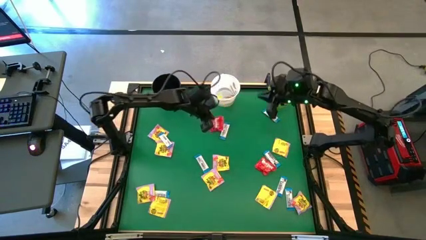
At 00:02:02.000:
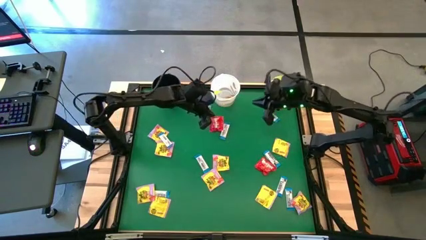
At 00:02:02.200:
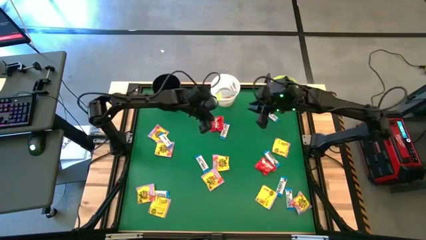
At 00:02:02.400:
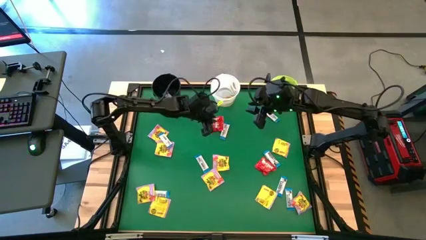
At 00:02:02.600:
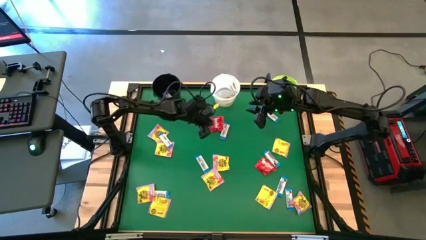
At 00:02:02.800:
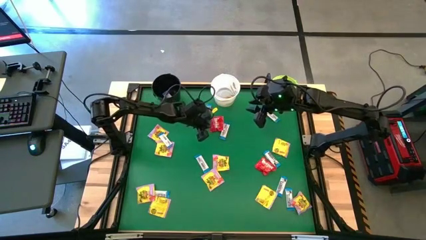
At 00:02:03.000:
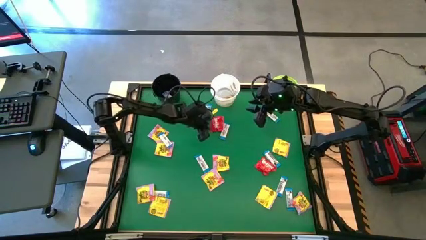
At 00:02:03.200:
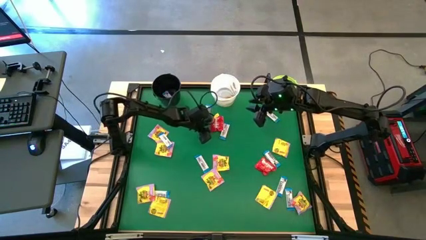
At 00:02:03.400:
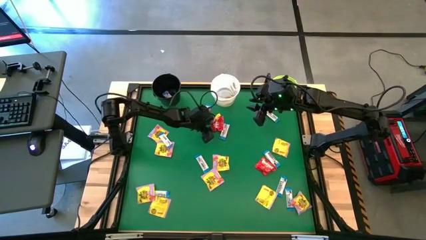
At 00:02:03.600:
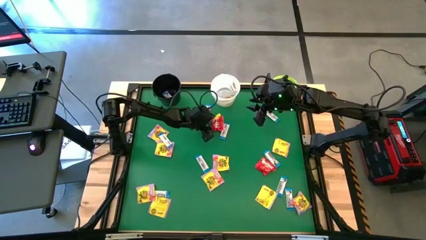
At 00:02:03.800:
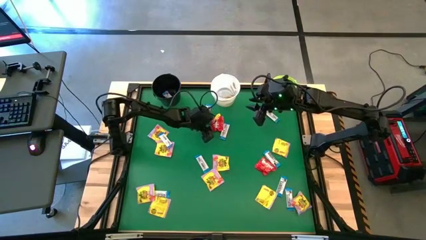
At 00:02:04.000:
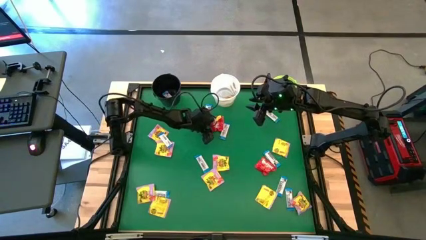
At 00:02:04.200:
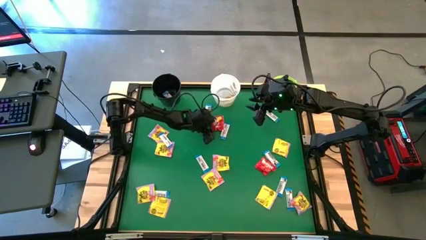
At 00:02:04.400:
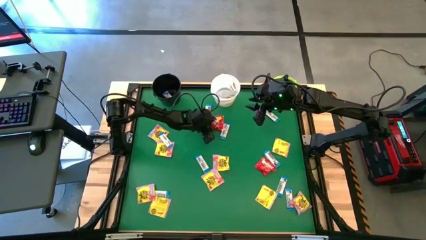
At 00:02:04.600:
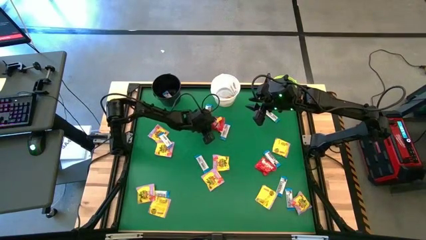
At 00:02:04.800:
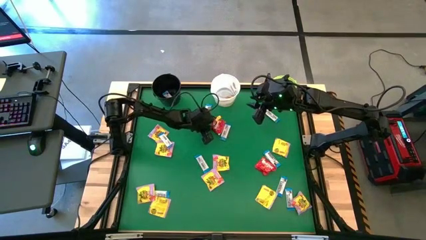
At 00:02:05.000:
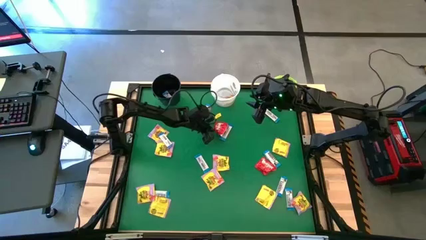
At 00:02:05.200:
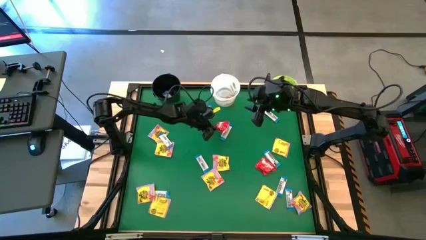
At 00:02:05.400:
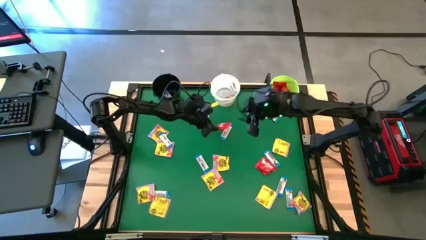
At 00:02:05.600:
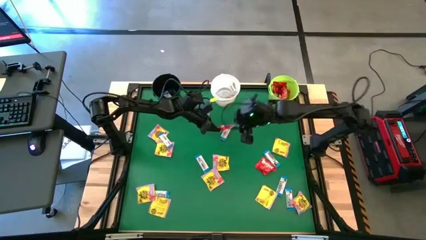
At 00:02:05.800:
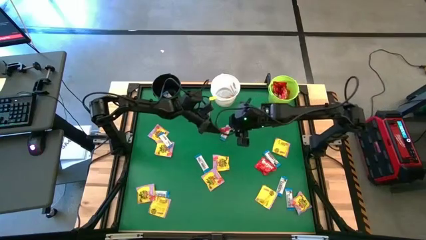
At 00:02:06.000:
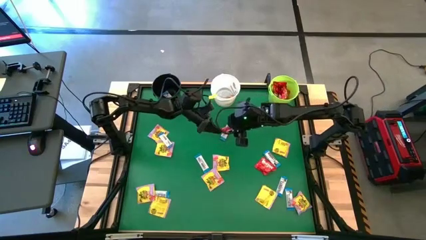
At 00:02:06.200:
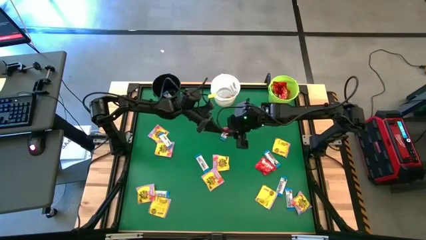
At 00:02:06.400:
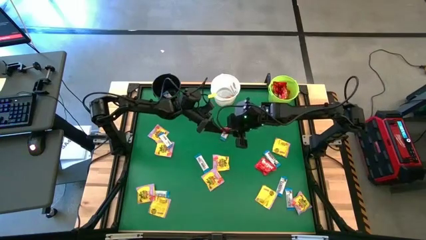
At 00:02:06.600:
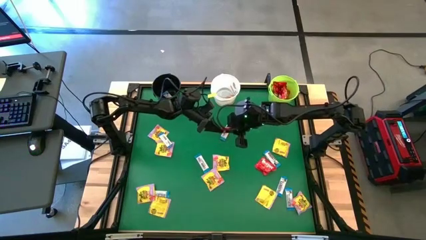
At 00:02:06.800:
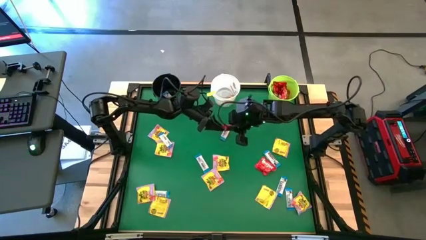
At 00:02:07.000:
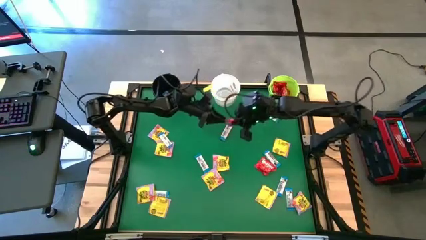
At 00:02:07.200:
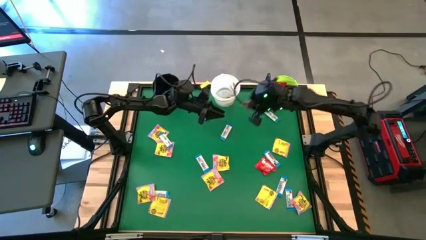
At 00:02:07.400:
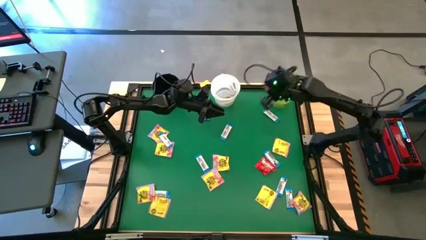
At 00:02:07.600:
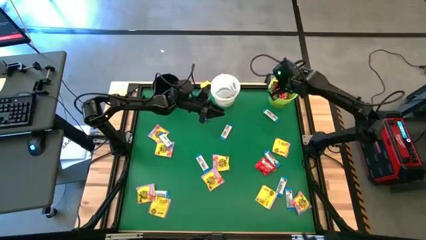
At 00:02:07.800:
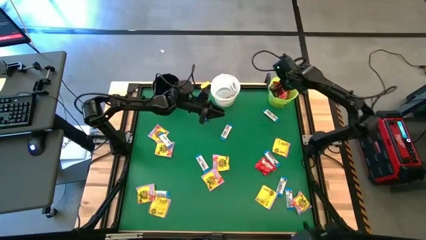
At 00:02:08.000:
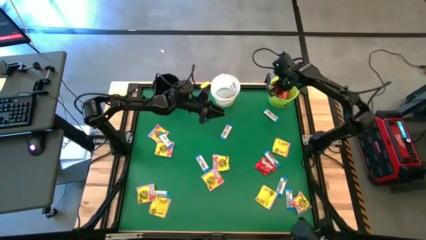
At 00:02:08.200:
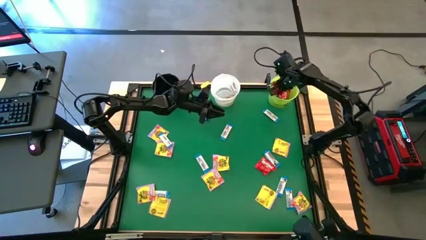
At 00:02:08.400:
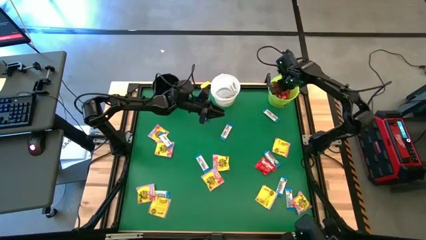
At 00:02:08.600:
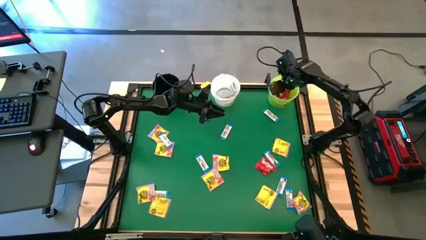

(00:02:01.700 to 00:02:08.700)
Task: Sort candy by brand, put in halloween buckets
Put the red candy into the green bucket

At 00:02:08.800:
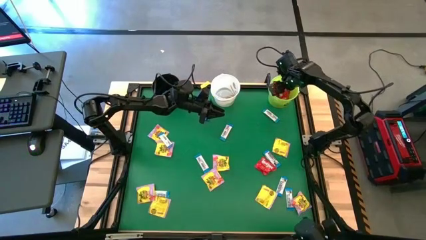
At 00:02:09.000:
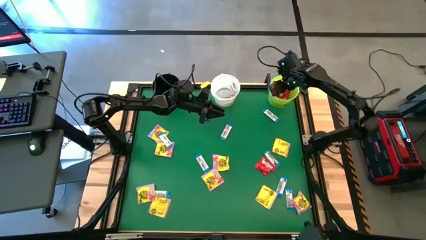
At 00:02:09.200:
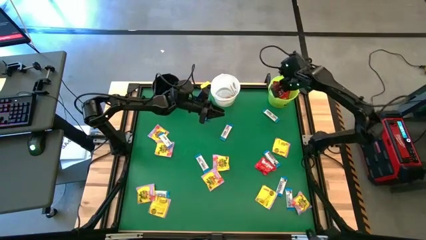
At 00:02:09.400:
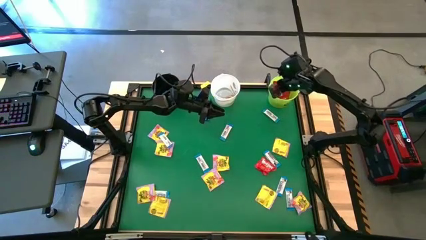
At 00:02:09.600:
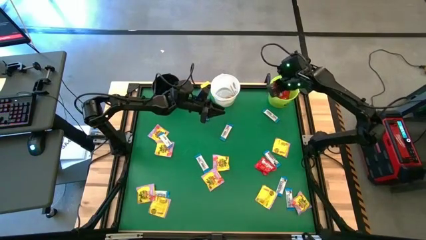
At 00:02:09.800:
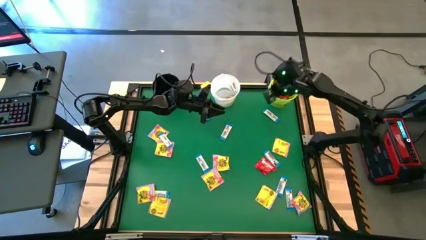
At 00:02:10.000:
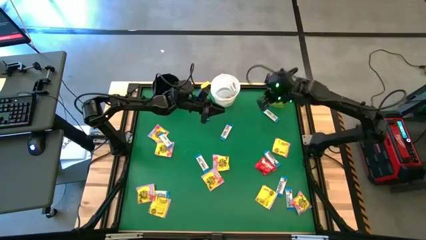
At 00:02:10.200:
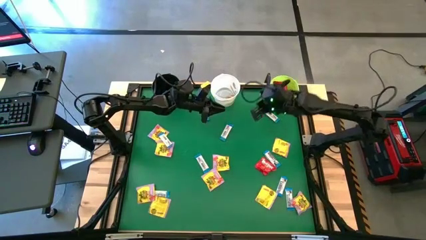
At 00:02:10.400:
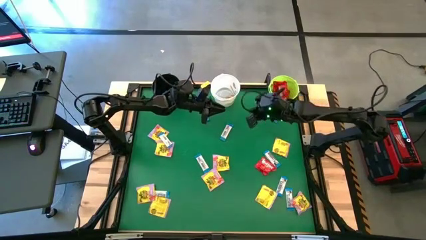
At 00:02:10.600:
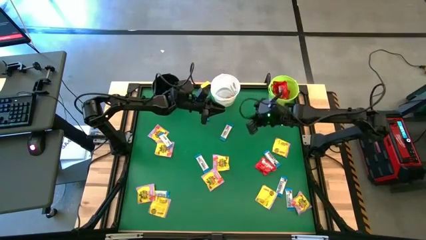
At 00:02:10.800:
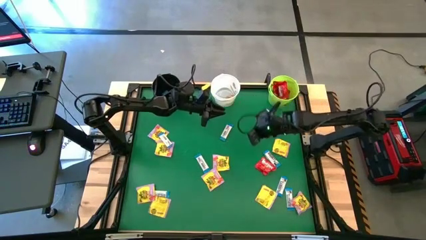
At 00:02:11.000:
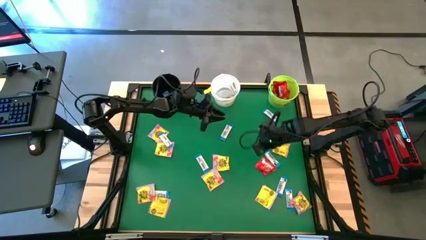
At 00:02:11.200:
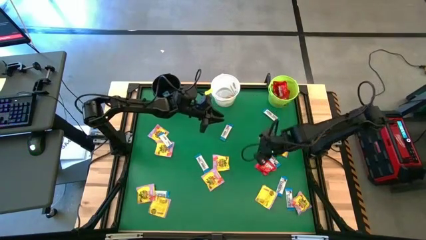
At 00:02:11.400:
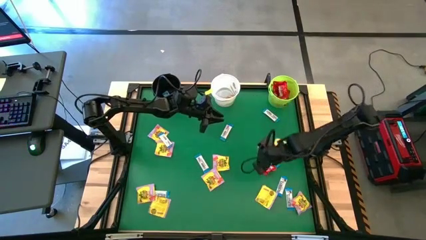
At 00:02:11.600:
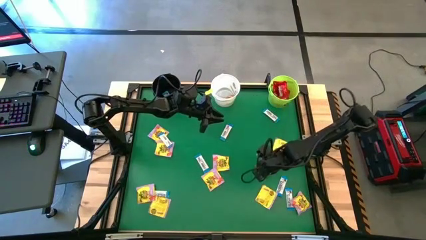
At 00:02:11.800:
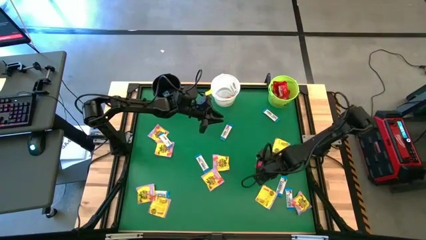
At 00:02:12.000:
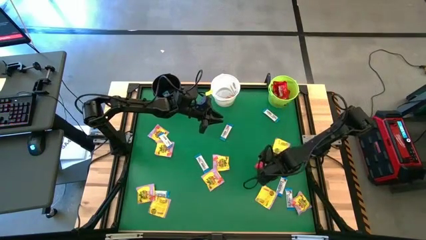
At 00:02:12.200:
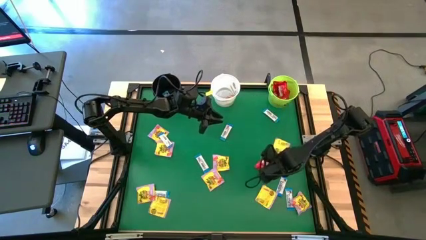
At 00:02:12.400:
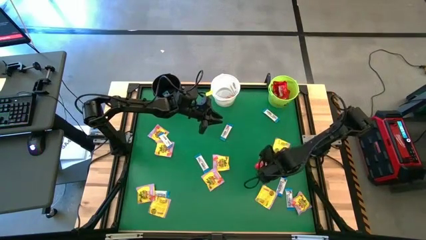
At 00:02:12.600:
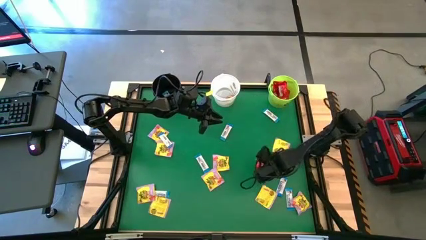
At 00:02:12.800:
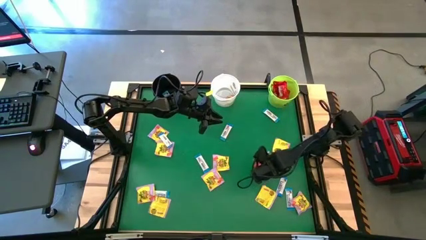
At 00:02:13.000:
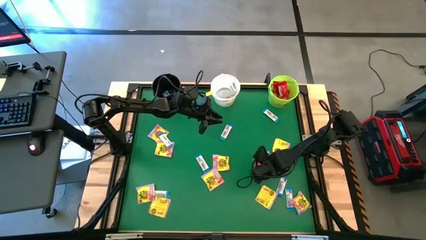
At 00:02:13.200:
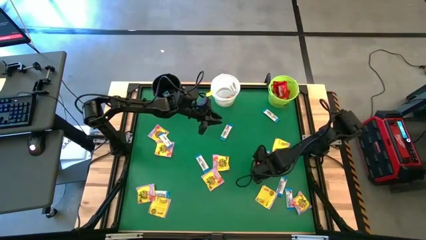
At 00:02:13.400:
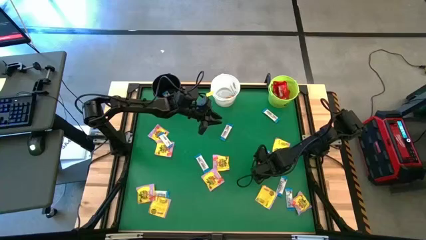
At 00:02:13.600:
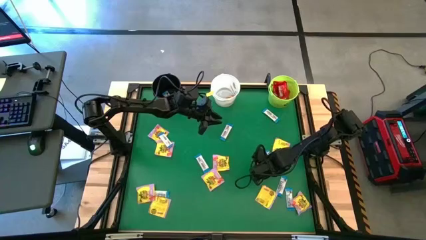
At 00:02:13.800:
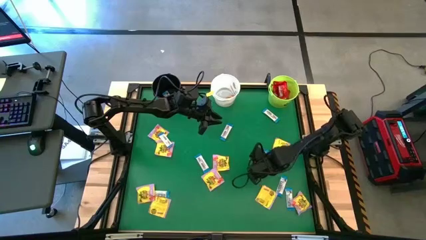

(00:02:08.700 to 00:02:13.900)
Put the red candy into the green bucket

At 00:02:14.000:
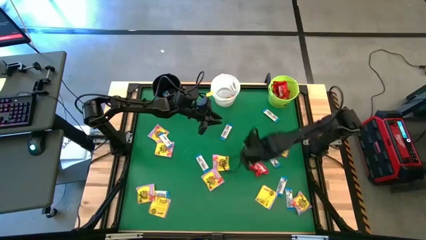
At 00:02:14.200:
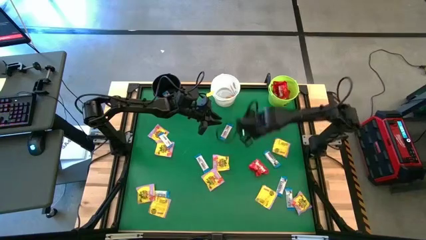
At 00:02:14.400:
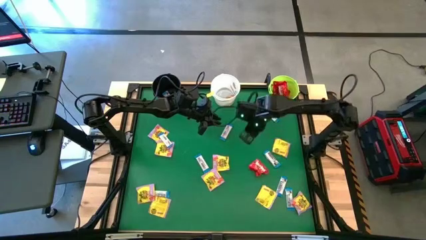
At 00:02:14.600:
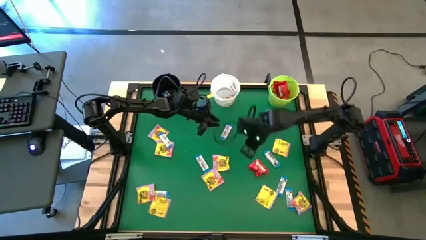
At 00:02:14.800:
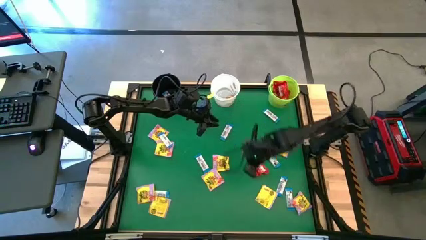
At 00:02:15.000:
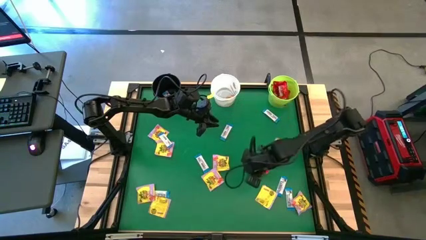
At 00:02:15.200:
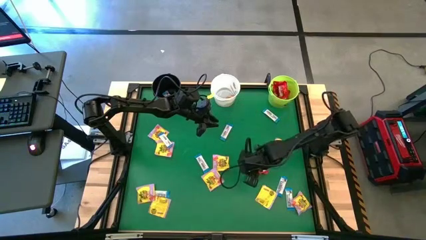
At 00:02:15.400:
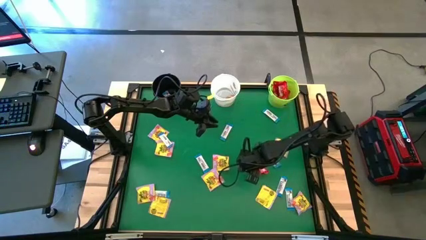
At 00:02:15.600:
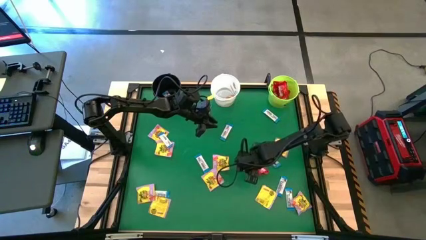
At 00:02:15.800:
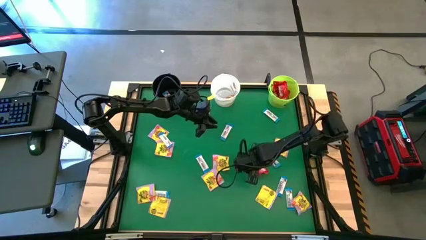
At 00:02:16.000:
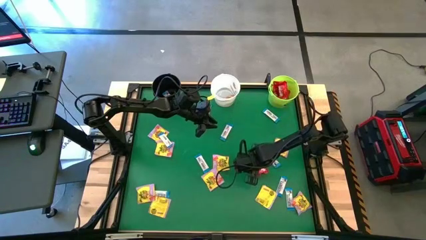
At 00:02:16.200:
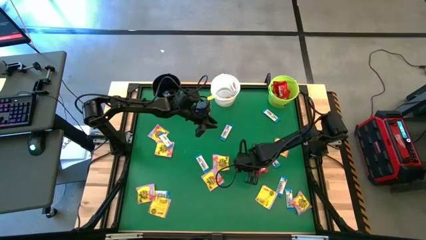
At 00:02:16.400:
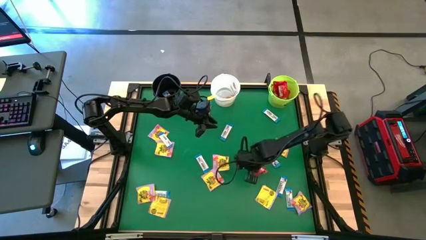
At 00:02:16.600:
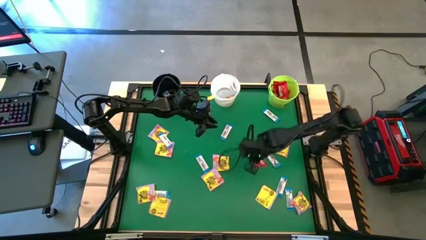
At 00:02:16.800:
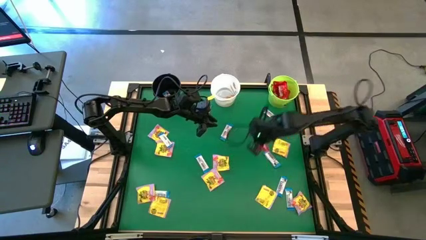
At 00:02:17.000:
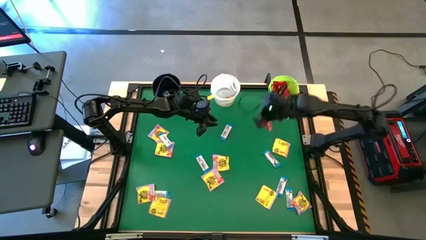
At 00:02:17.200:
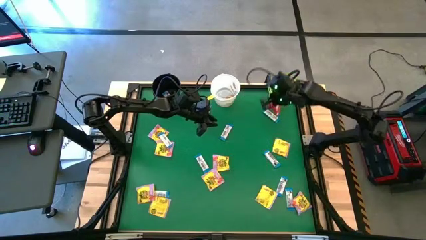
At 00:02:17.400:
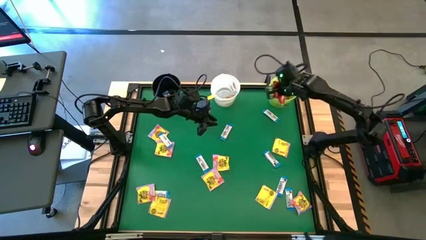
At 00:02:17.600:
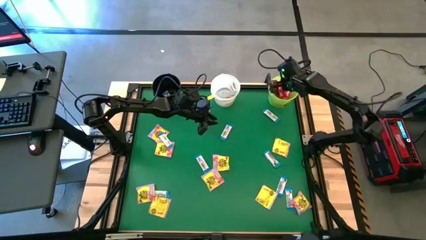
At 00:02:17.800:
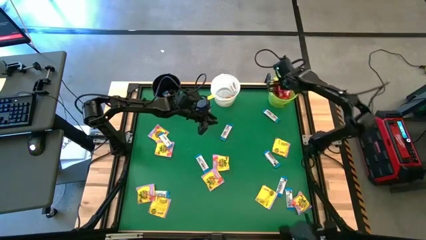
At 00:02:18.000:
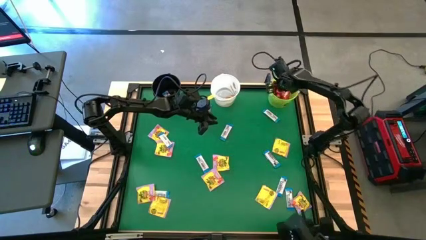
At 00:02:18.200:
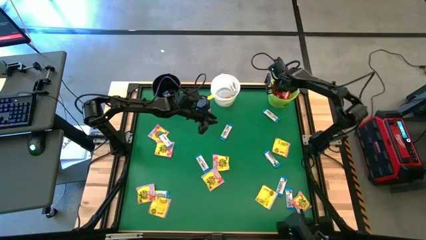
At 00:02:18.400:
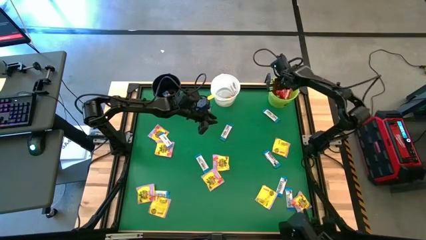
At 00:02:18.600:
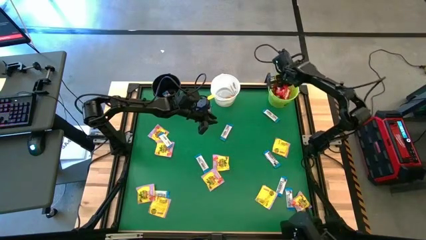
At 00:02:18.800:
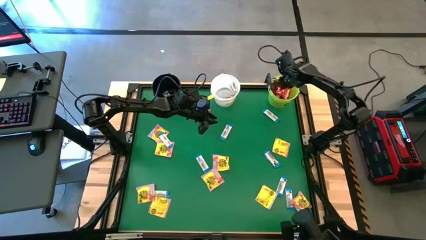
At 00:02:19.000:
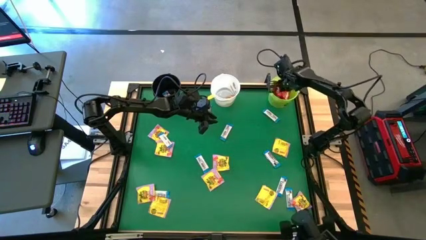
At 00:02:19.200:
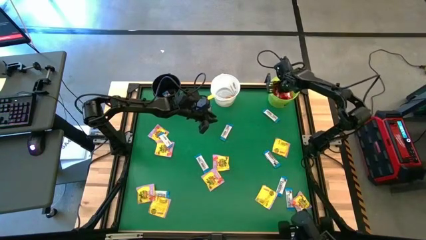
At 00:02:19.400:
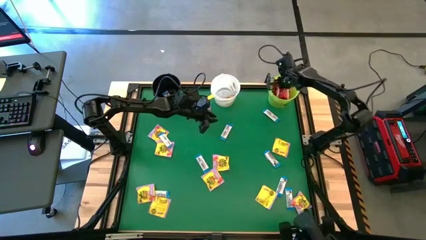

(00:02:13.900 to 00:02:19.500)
Put the red candy into the green bucket
